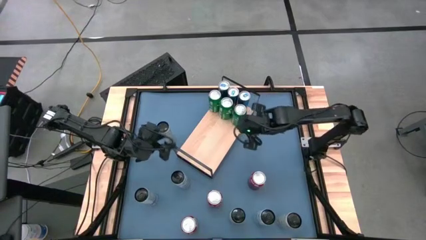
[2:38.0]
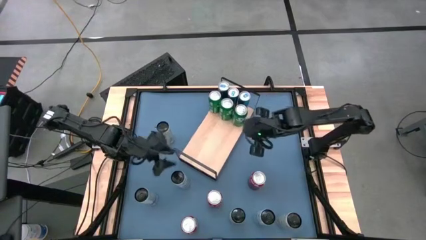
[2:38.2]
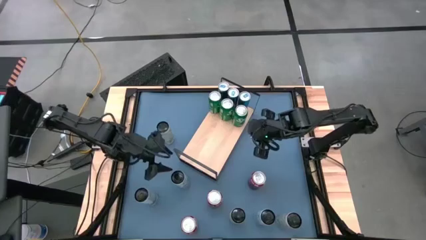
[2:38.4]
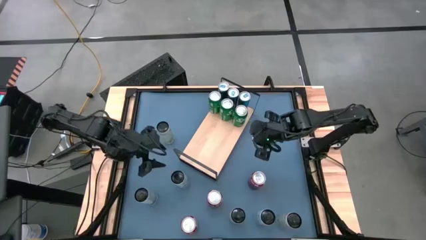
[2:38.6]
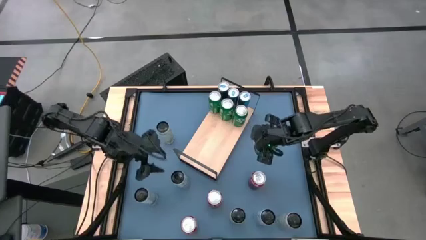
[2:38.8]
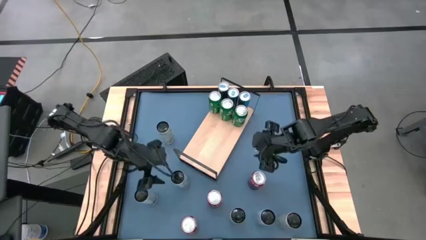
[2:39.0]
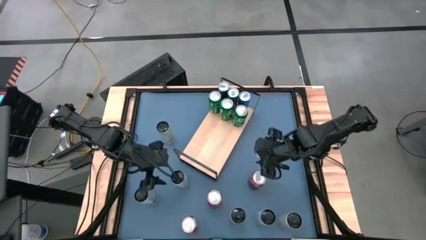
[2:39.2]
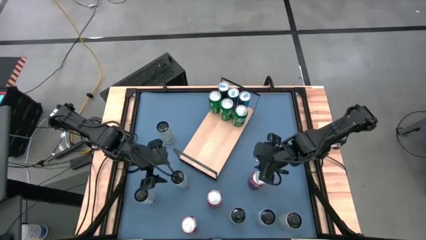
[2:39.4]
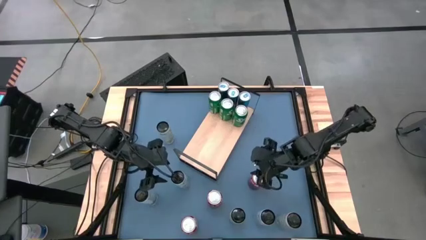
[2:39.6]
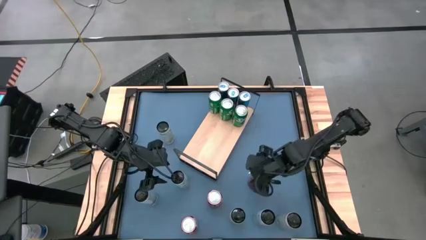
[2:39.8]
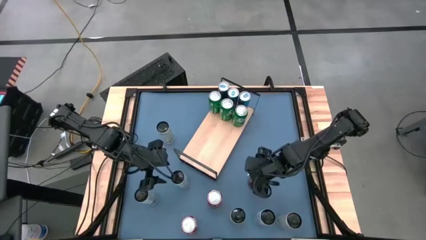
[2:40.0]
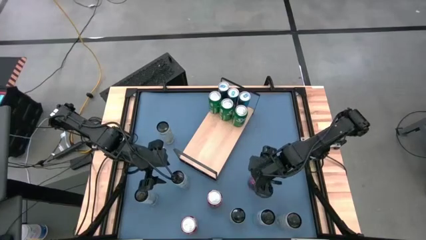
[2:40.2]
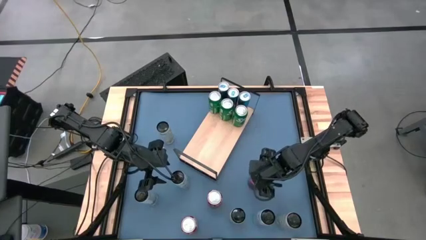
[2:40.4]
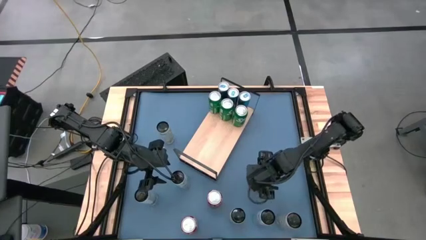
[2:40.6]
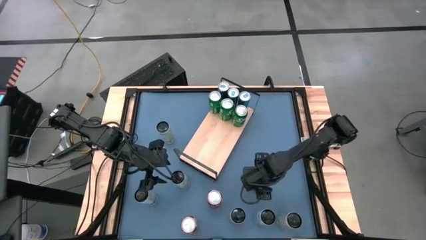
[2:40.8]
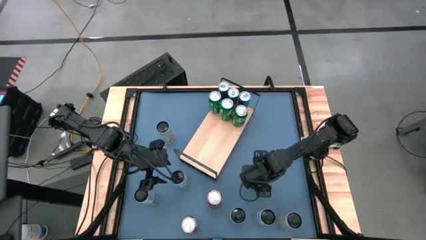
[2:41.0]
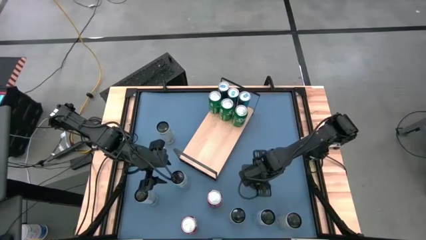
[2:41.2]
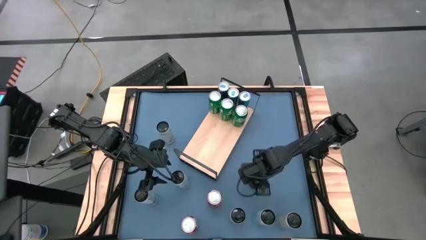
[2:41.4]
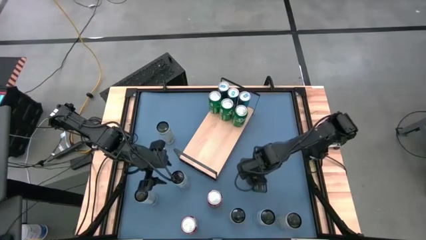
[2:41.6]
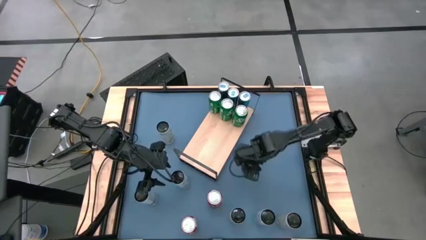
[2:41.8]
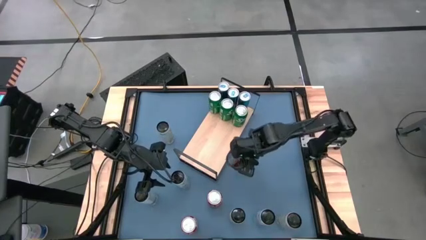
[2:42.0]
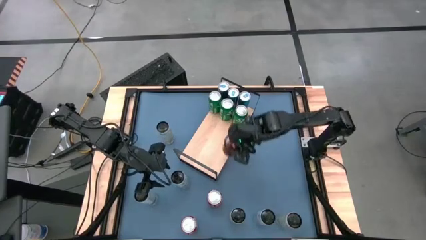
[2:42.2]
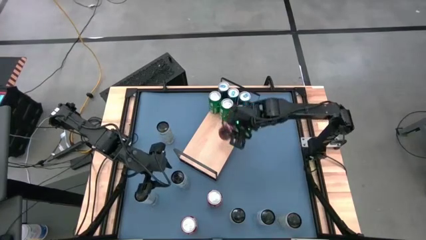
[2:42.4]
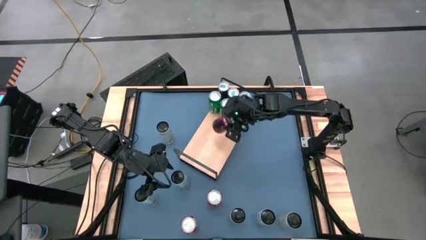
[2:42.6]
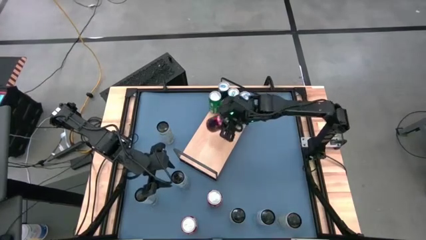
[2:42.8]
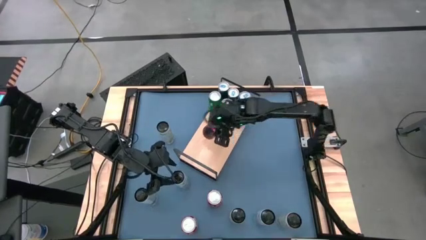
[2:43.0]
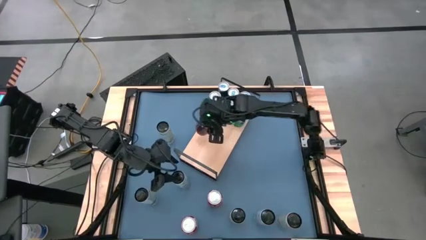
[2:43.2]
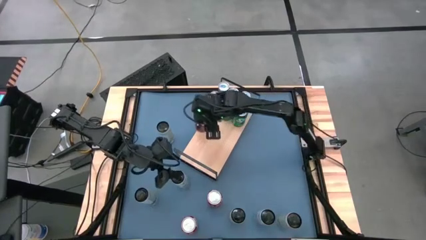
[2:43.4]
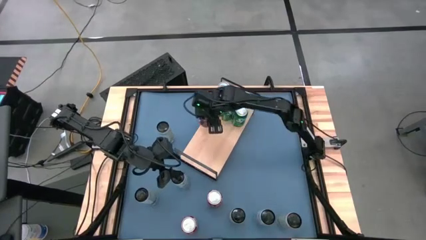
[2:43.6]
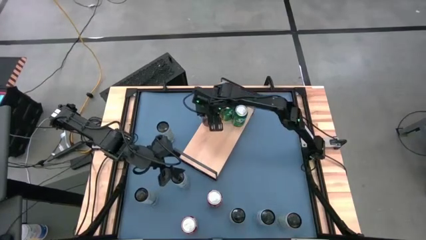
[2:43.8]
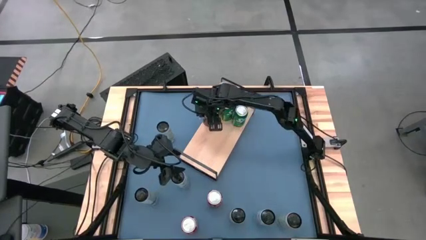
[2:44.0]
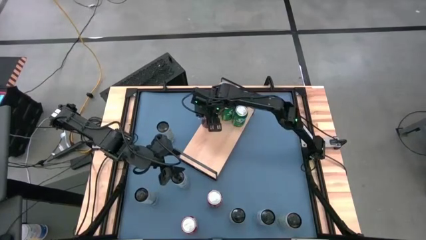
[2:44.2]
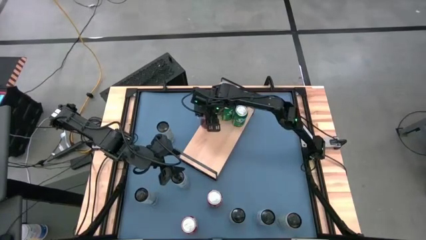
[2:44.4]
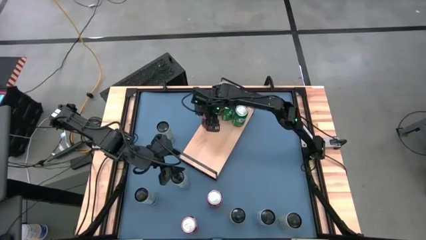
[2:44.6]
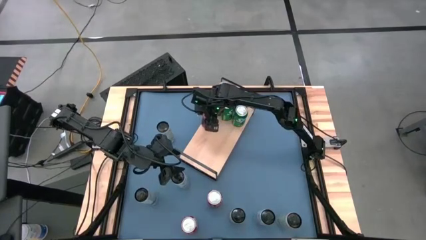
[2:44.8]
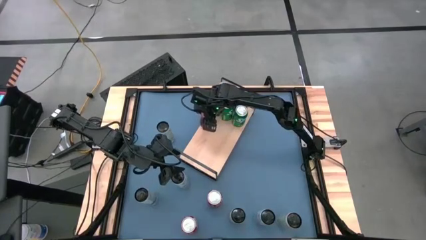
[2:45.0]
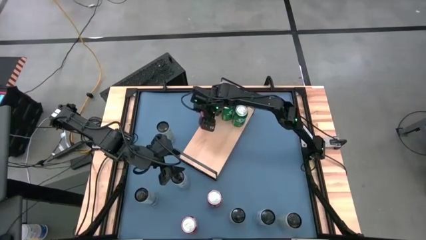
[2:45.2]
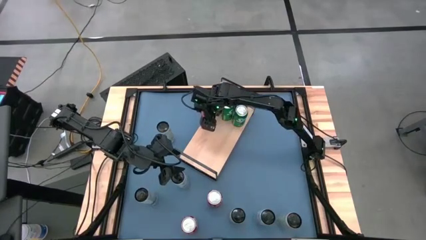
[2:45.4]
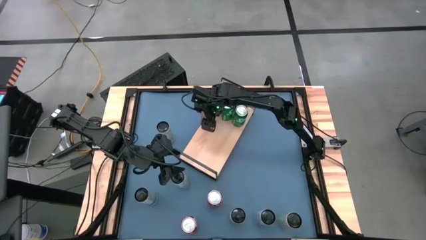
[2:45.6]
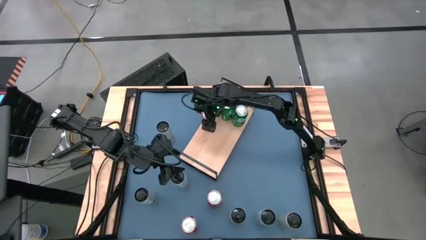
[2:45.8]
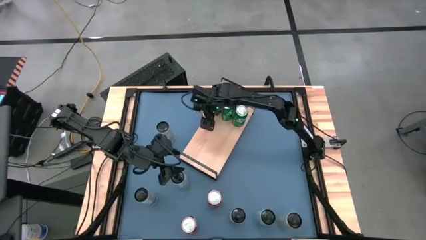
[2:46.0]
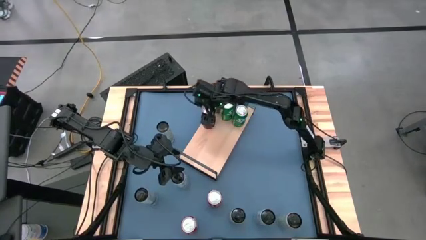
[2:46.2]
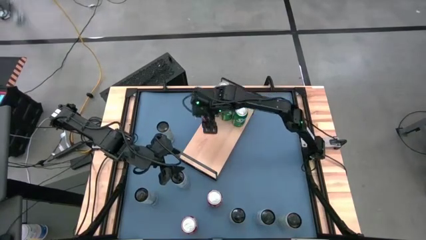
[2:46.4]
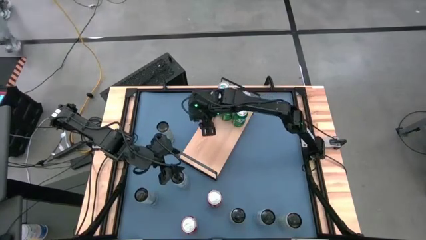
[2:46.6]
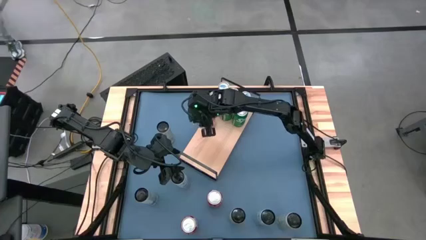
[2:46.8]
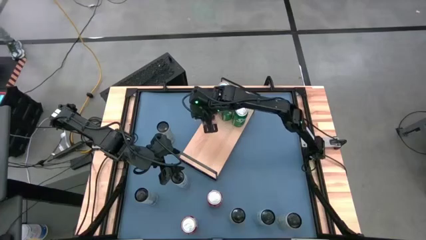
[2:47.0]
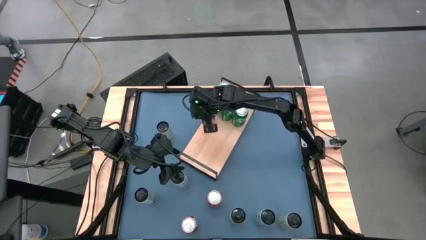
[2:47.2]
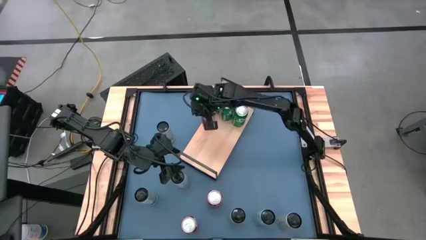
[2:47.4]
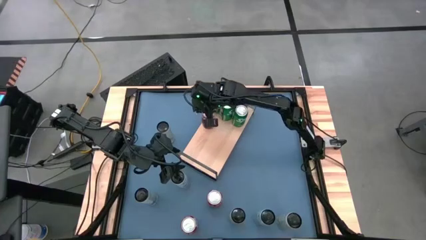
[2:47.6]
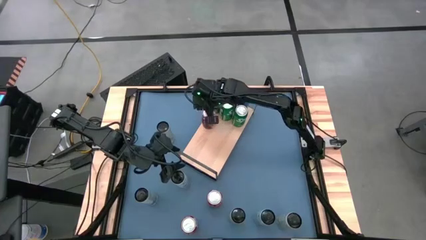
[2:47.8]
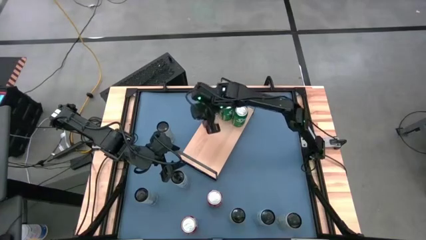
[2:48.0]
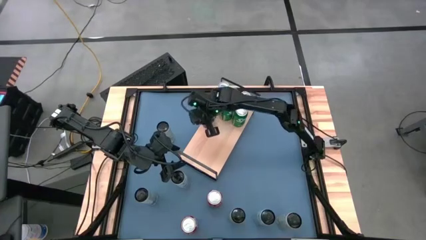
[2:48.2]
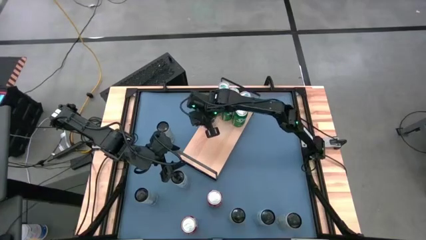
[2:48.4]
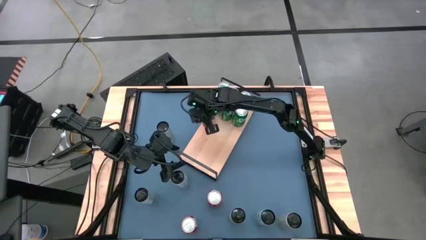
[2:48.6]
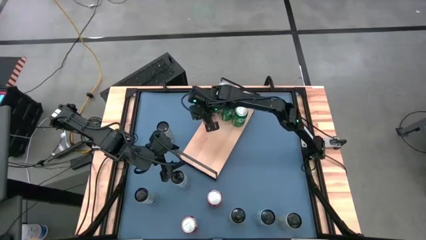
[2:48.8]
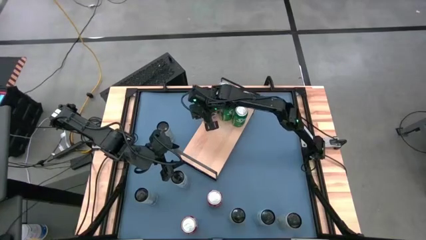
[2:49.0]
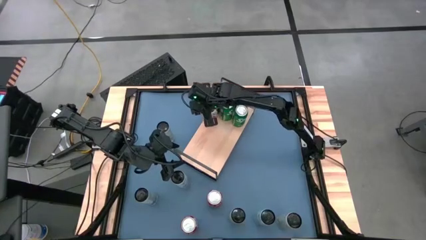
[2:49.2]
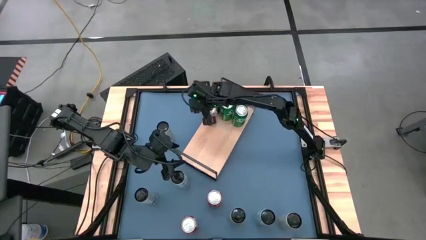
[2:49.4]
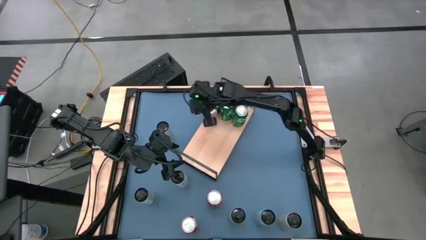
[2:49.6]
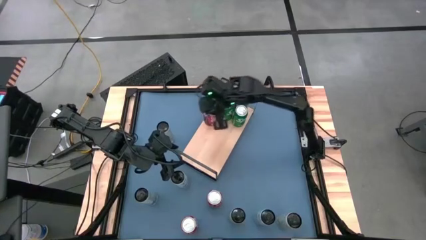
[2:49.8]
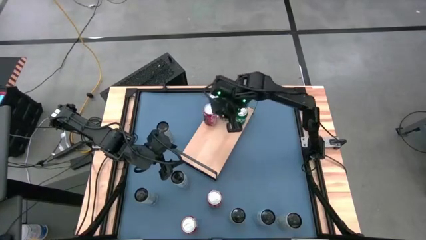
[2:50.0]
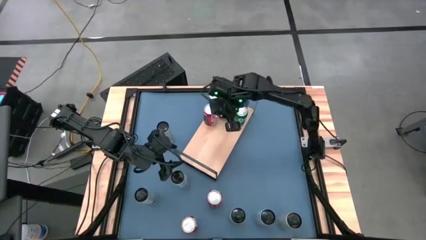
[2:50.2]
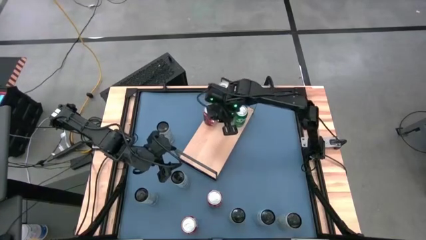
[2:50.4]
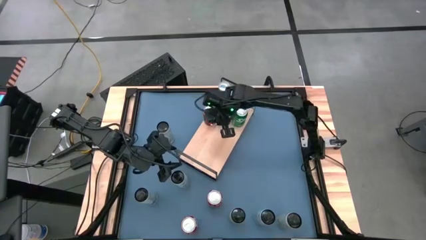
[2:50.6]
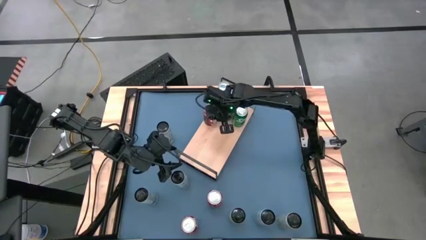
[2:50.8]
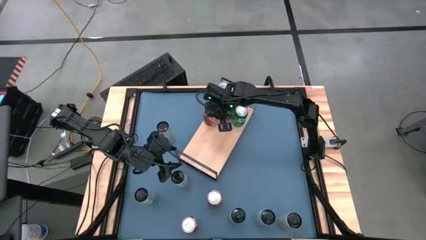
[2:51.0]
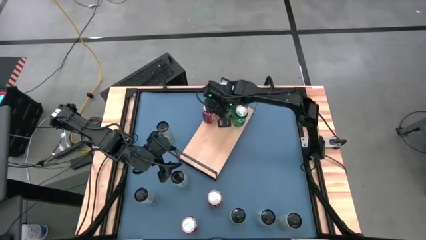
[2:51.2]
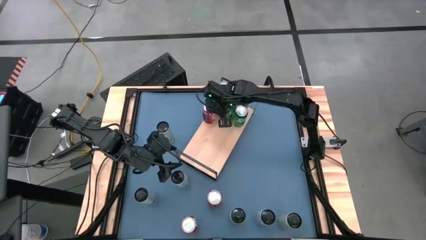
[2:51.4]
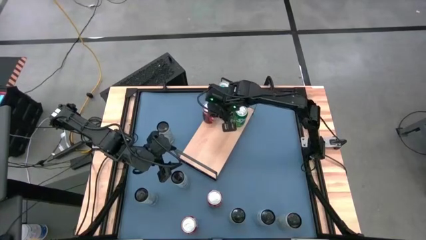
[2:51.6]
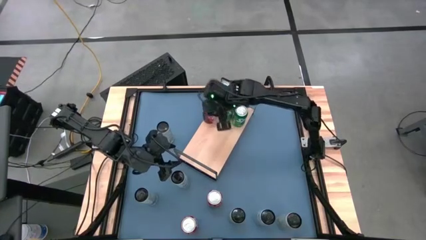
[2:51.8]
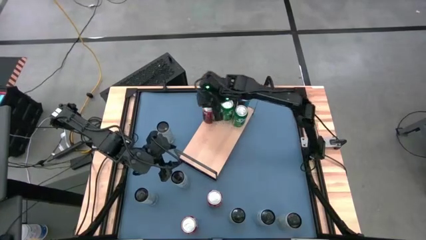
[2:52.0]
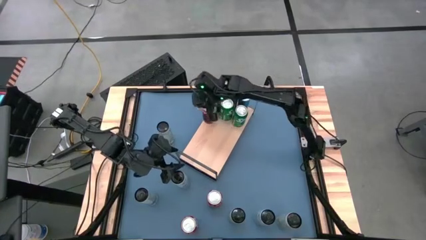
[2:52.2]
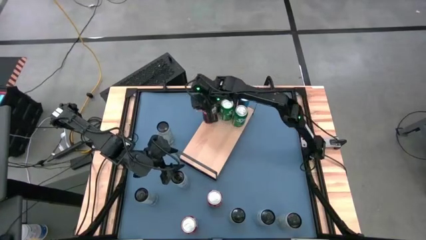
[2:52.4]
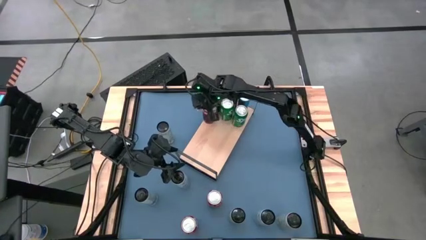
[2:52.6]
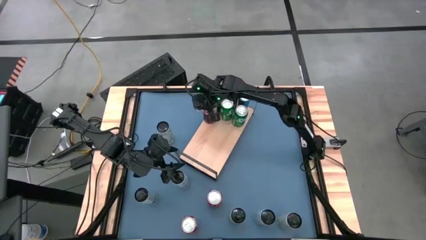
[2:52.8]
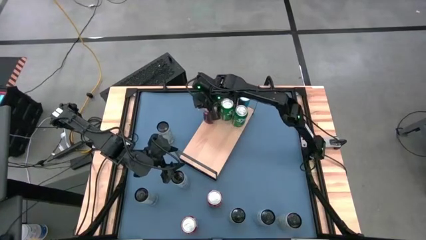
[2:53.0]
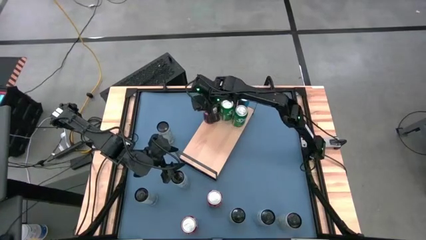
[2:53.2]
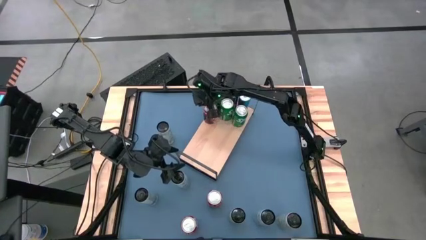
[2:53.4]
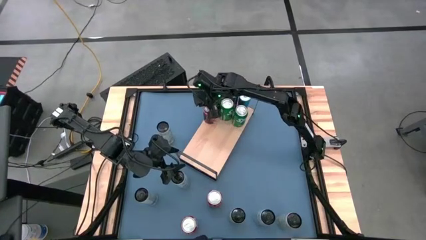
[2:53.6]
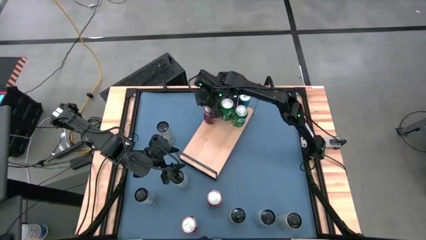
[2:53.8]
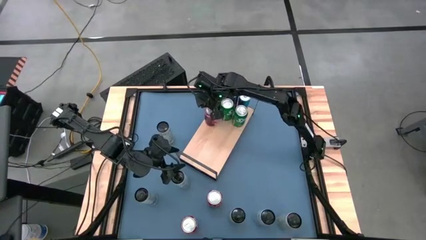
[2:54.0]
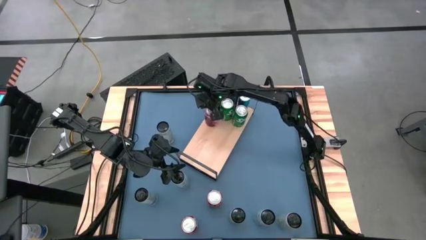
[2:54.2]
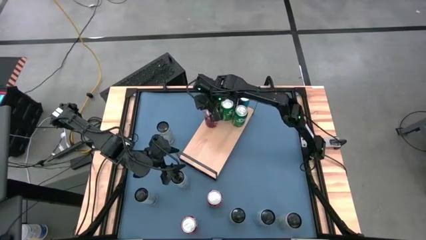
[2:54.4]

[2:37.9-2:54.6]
Task: Place canned beverage on shelf
Put the top red soda can on the shelf
